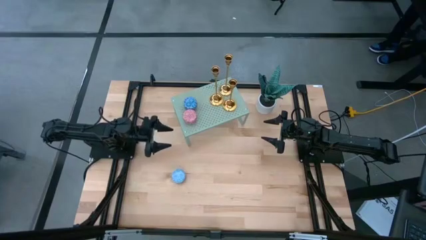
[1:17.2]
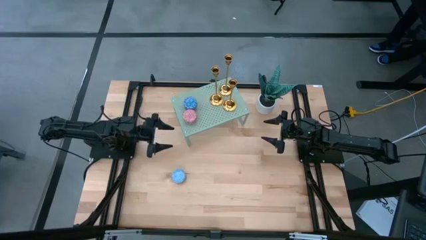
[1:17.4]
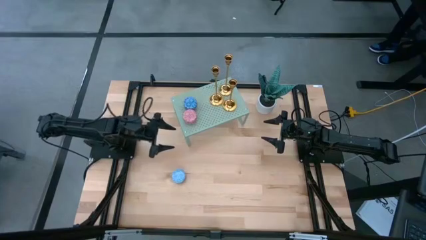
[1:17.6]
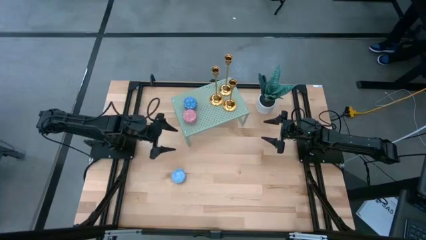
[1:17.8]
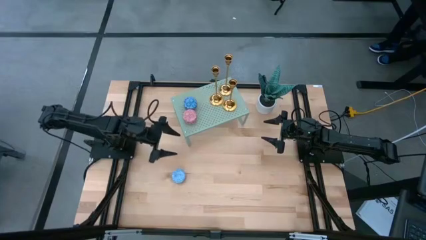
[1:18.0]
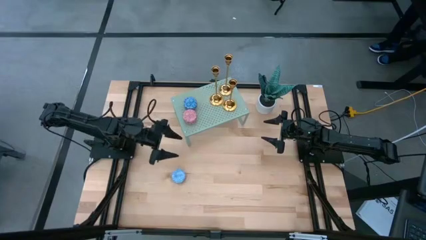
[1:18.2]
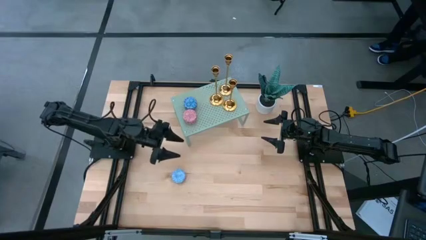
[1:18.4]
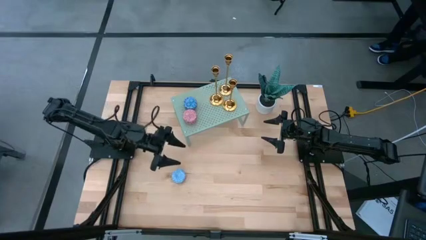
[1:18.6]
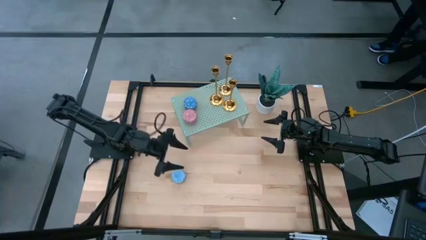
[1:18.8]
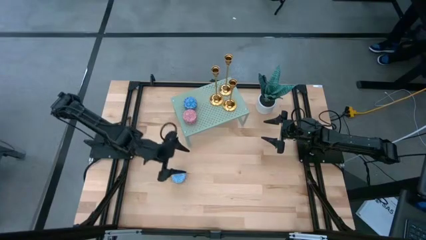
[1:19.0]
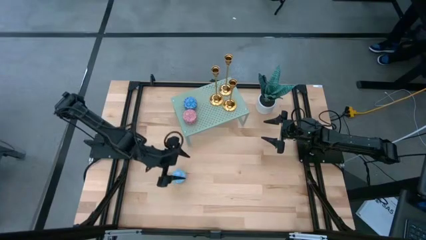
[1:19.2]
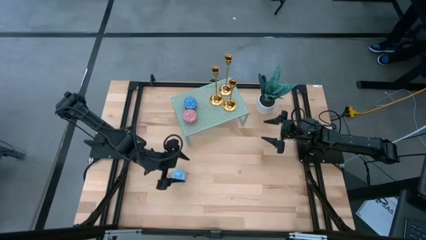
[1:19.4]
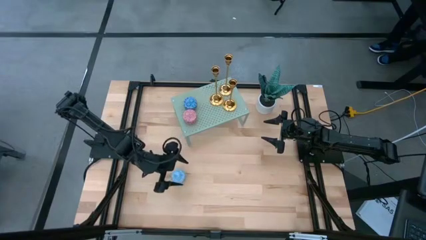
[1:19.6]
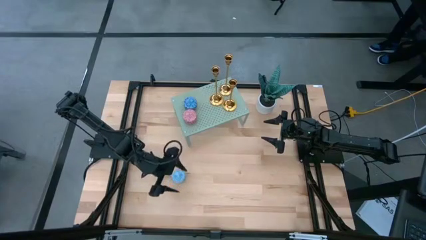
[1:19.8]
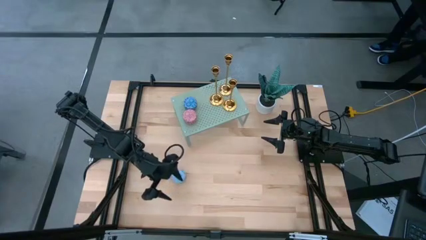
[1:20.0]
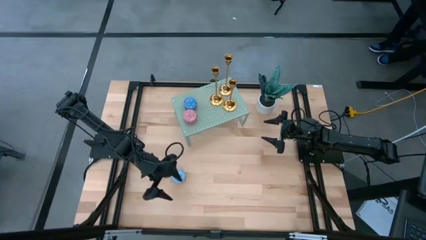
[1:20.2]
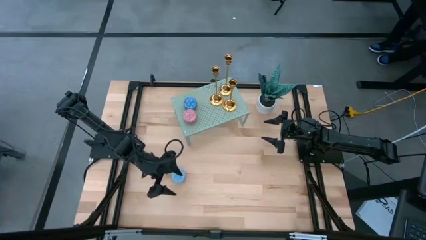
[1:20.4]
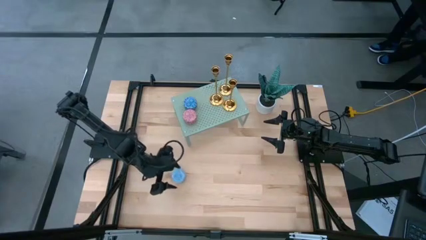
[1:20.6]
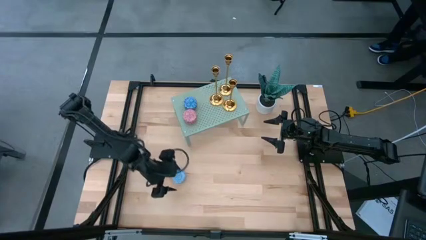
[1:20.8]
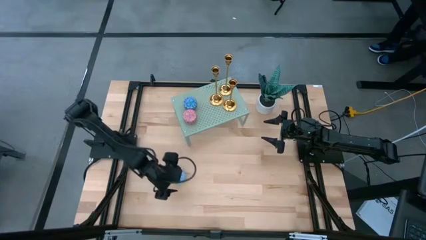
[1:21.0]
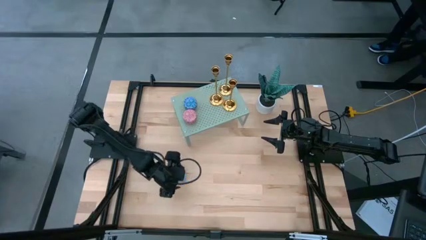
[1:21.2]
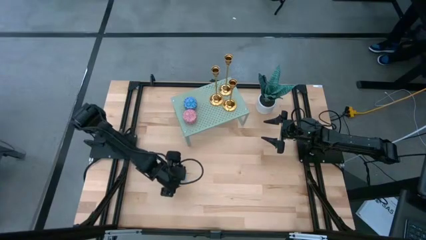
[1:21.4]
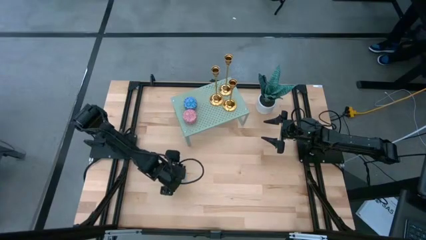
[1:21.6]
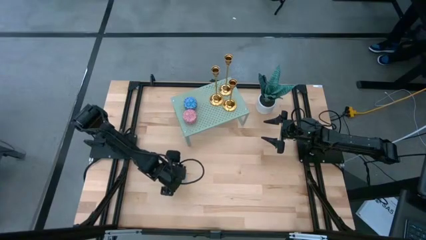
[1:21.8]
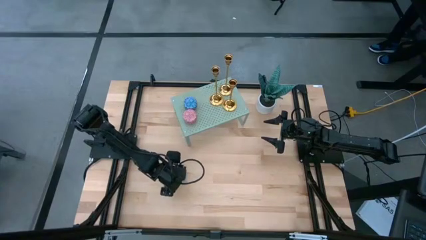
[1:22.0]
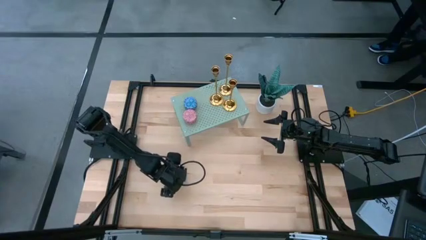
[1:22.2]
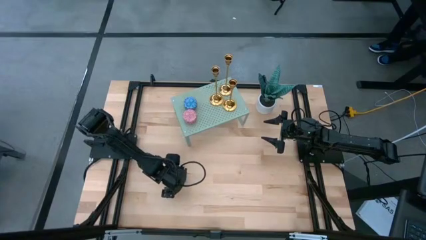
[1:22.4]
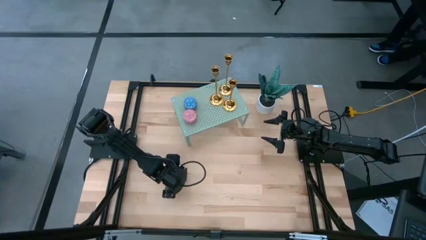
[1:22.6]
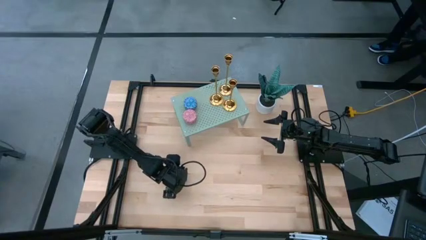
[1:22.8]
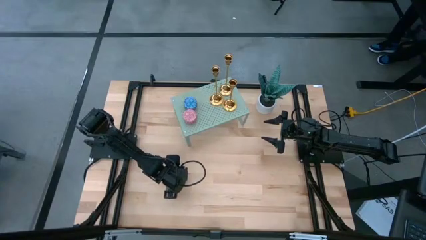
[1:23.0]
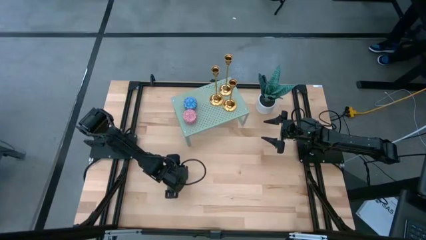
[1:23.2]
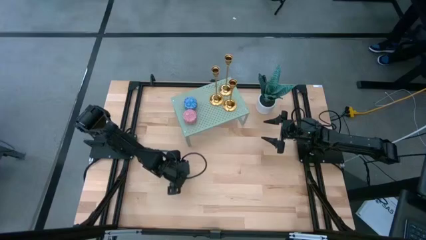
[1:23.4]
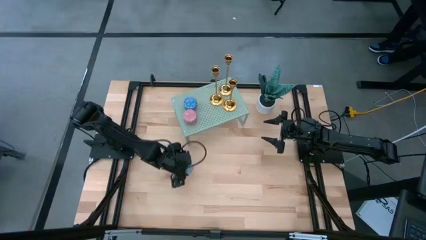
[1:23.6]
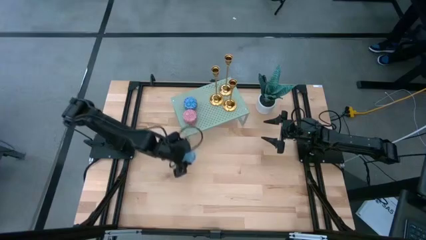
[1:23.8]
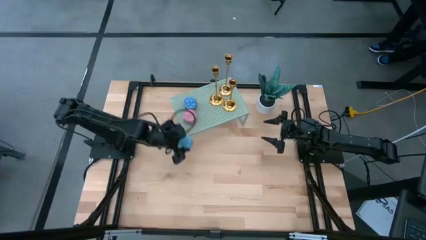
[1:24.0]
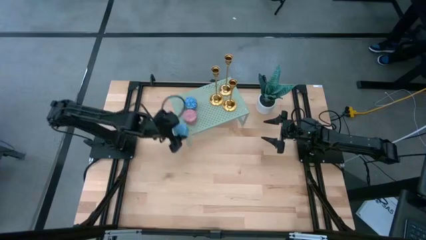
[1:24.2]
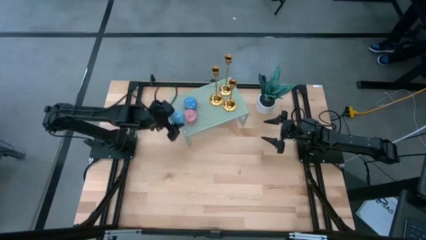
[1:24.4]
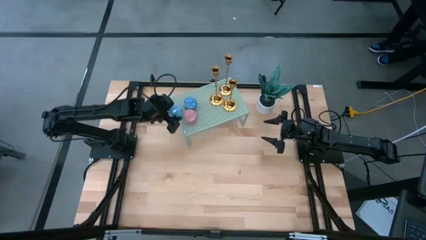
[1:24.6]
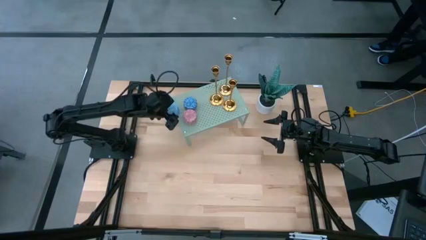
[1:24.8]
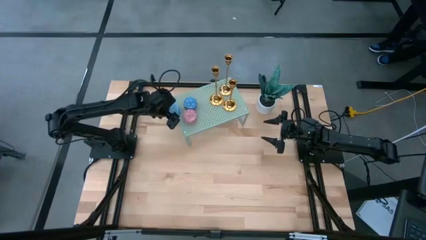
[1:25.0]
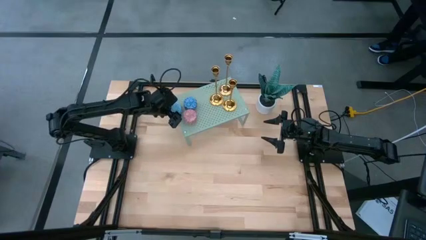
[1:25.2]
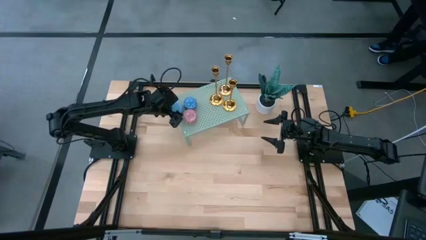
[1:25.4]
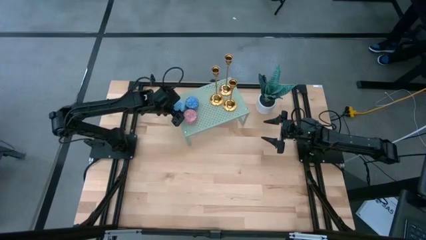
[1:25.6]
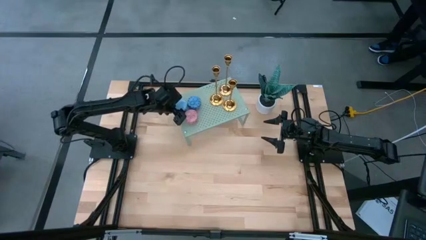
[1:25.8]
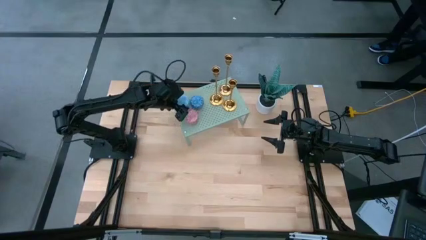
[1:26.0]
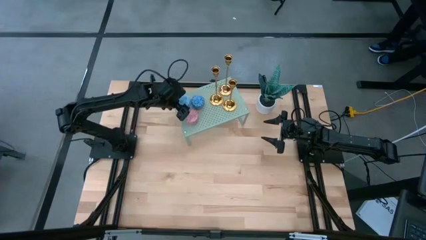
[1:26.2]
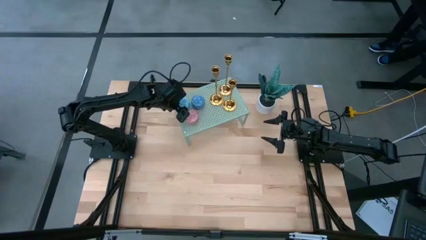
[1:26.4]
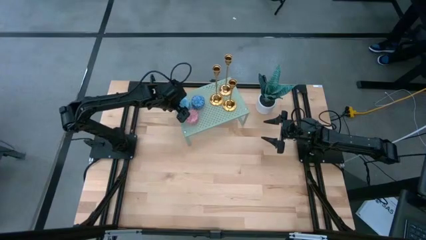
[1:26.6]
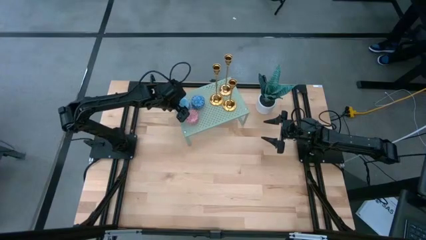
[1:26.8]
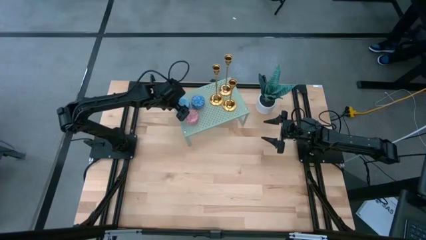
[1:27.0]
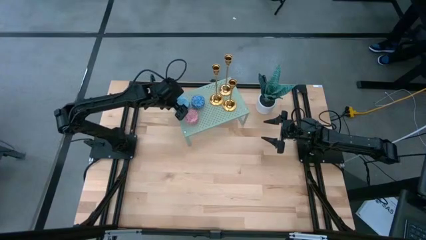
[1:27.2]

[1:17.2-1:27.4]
Task: Pick & Place candle stick holders
Put the light blue scented candle on the shelf

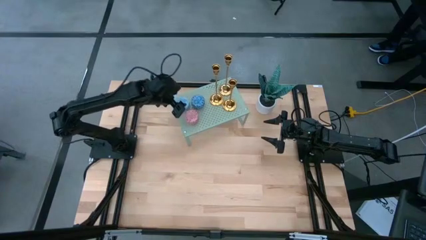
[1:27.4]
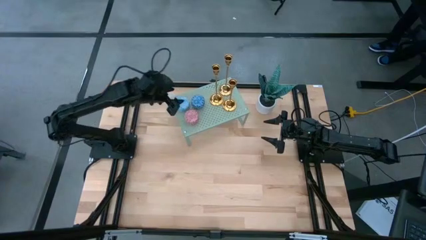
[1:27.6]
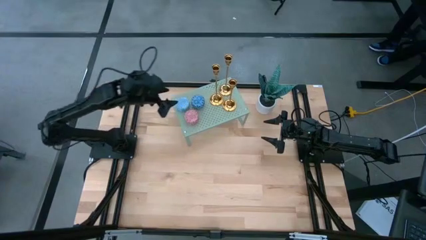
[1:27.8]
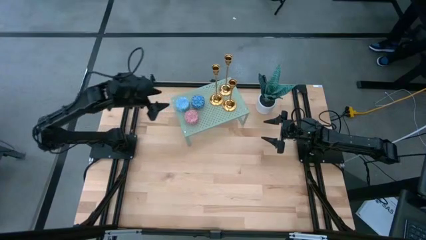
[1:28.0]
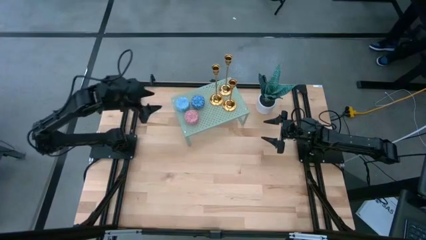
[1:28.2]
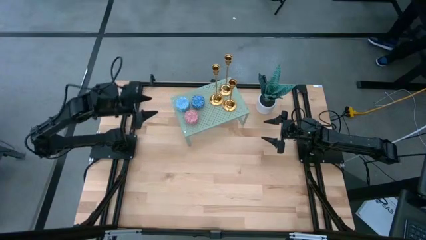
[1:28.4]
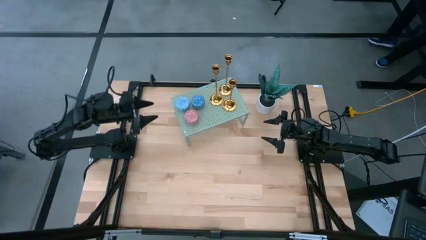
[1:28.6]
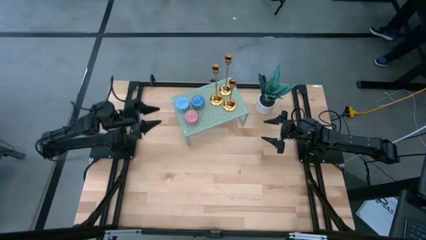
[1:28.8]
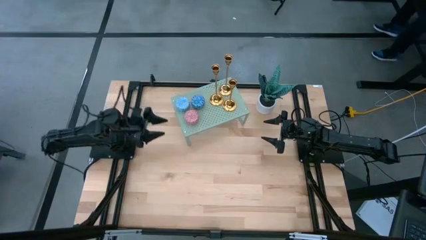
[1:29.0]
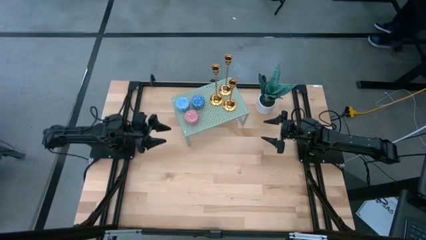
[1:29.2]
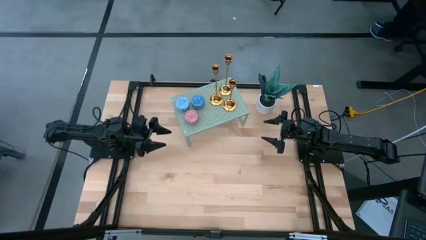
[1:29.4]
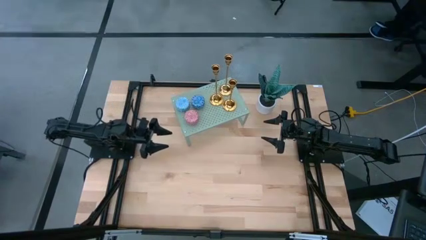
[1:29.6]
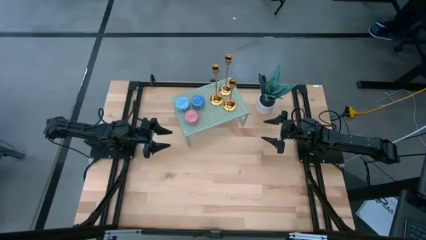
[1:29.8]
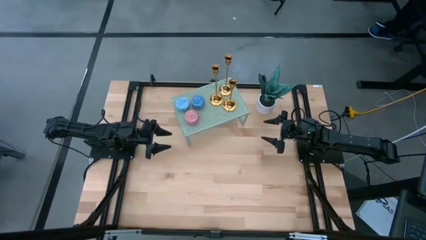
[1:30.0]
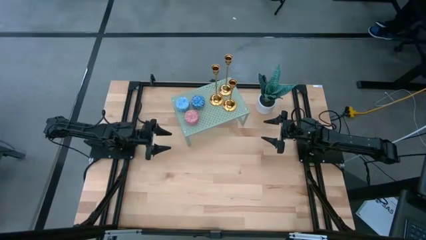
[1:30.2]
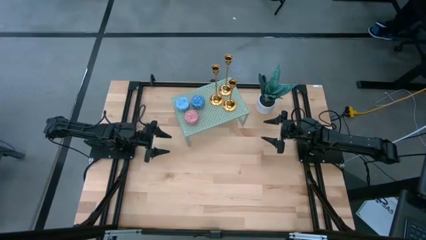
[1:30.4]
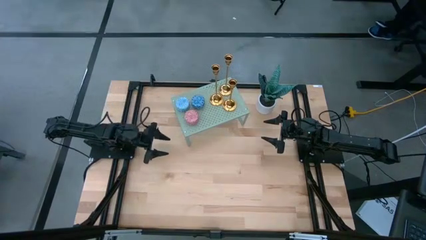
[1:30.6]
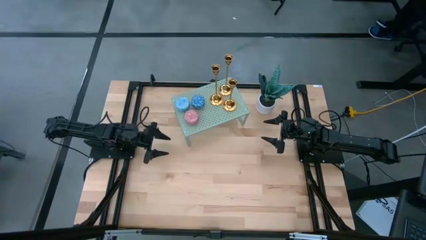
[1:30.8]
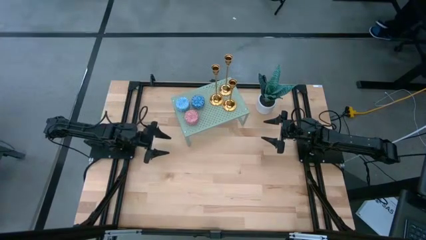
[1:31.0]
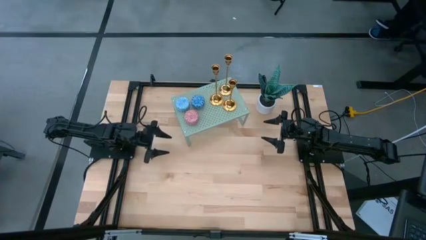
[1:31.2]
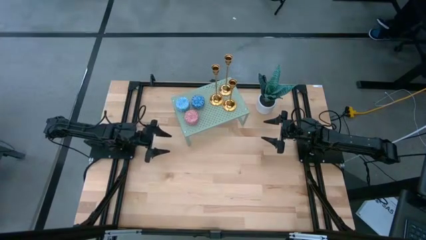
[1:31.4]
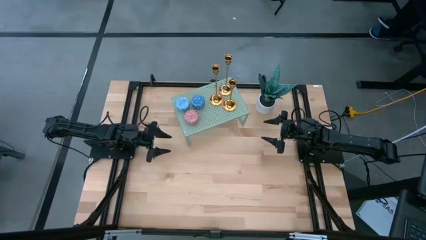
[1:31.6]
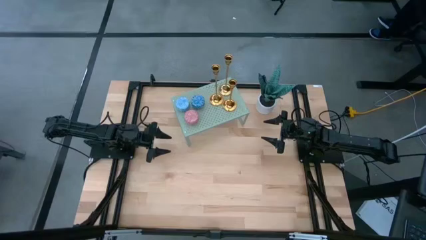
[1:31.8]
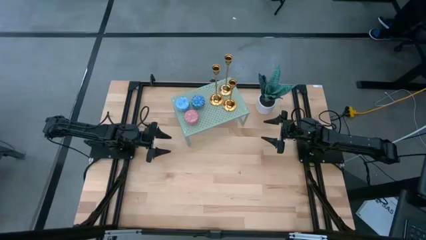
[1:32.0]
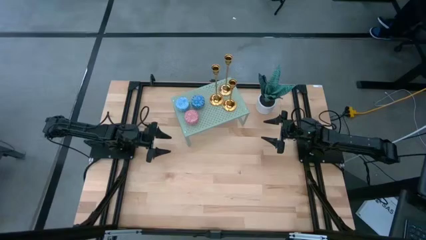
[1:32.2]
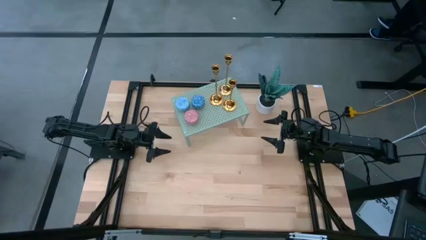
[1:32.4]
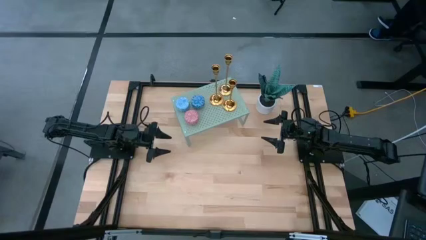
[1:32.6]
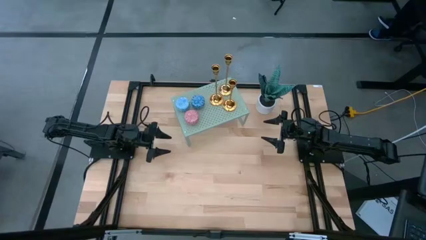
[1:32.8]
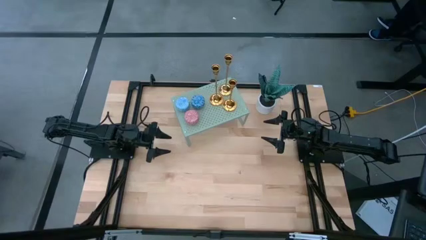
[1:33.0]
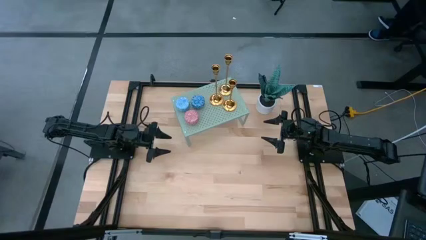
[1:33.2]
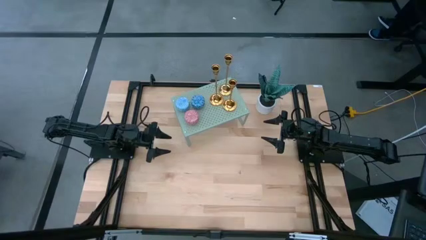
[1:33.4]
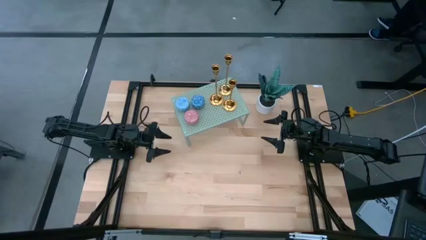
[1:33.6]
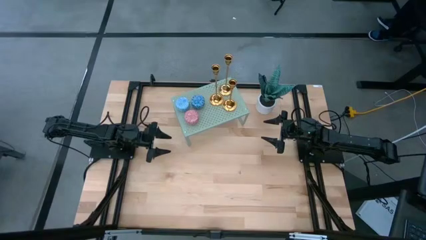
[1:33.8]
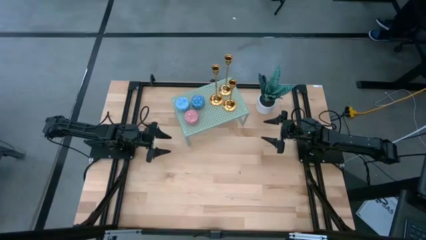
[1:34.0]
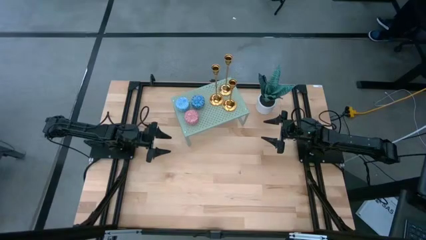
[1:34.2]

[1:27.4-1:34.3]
Return to Home Position
